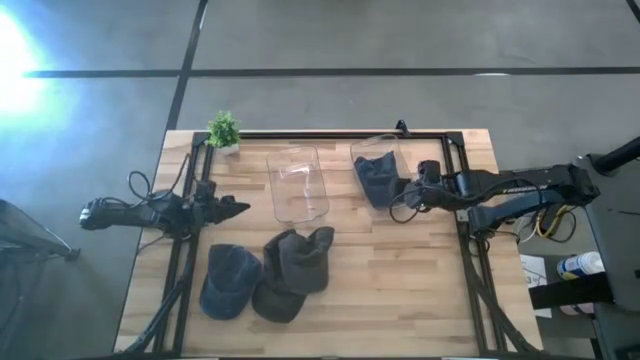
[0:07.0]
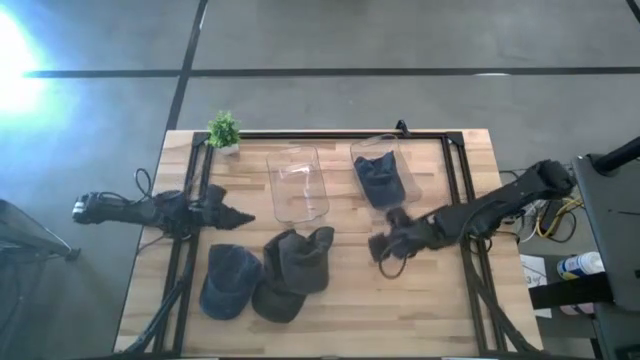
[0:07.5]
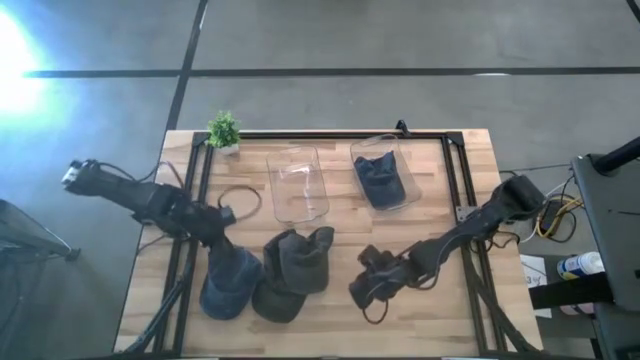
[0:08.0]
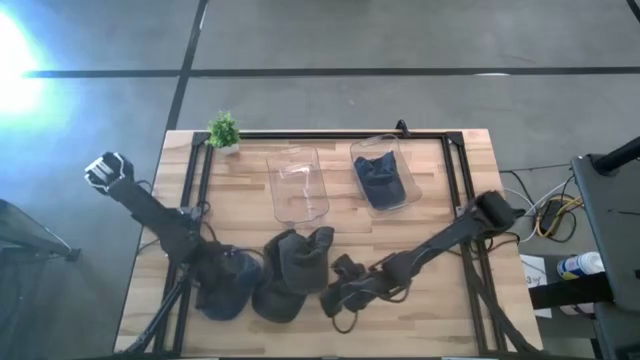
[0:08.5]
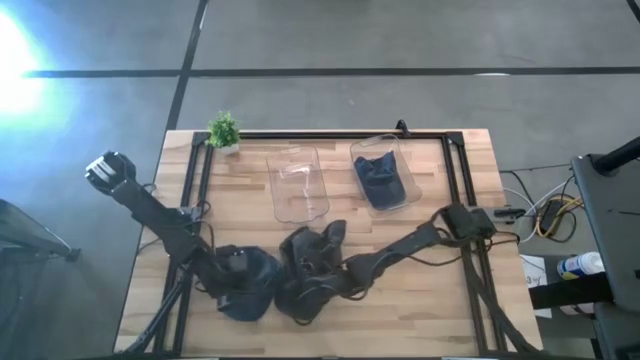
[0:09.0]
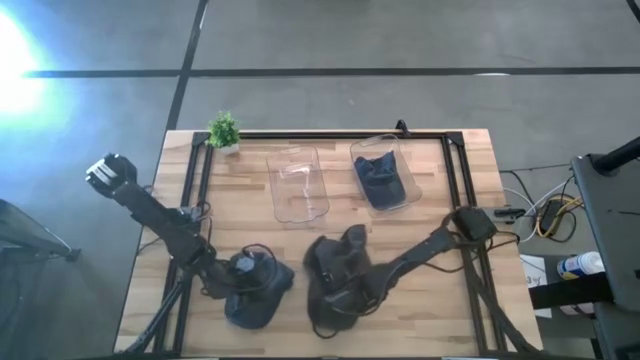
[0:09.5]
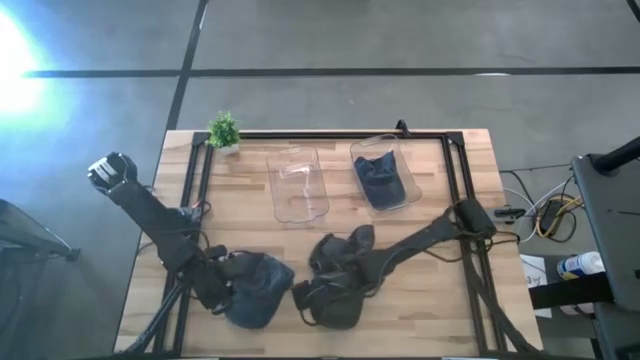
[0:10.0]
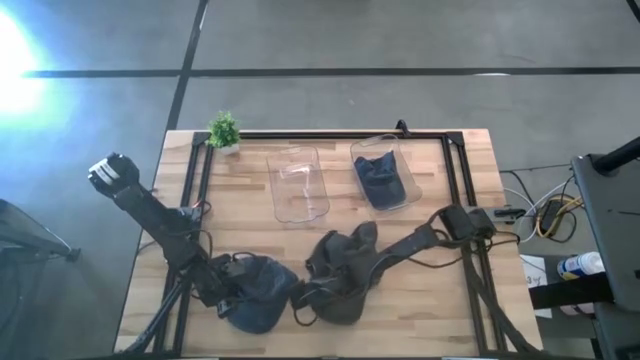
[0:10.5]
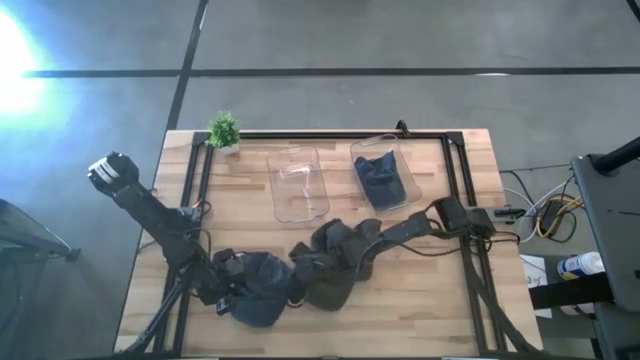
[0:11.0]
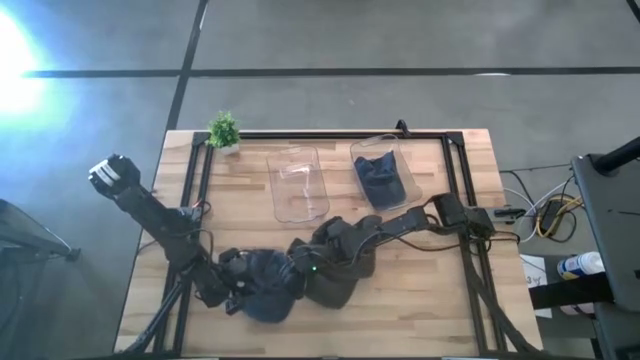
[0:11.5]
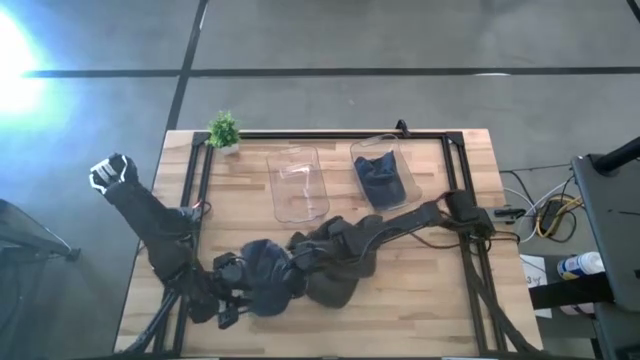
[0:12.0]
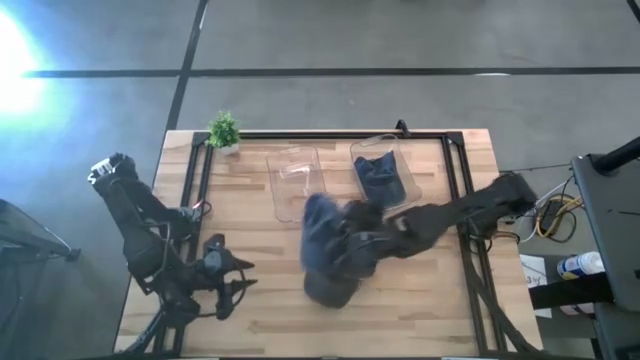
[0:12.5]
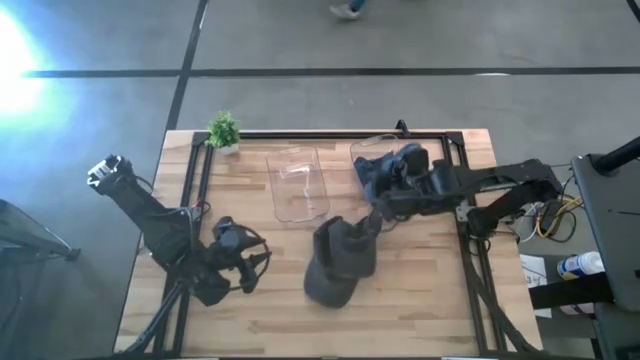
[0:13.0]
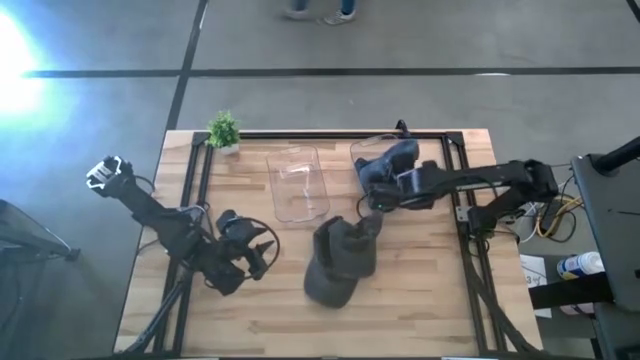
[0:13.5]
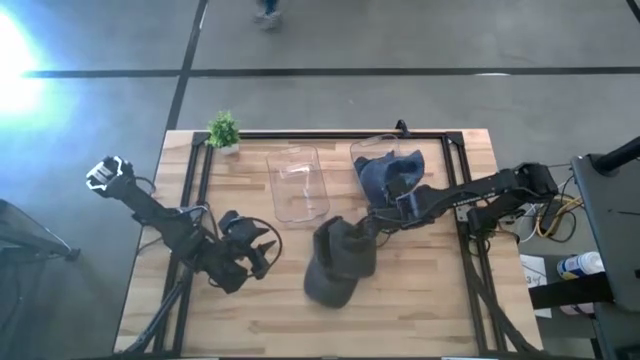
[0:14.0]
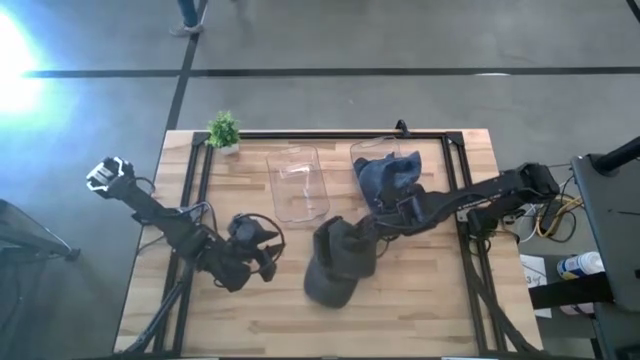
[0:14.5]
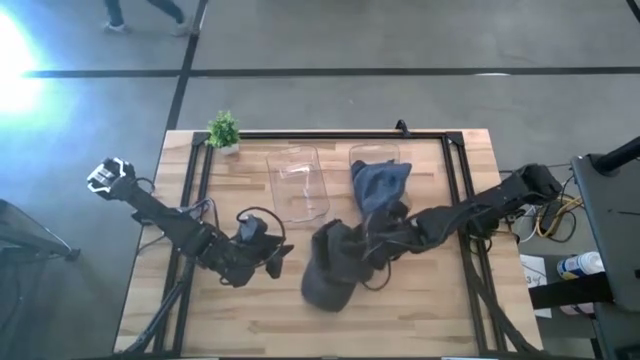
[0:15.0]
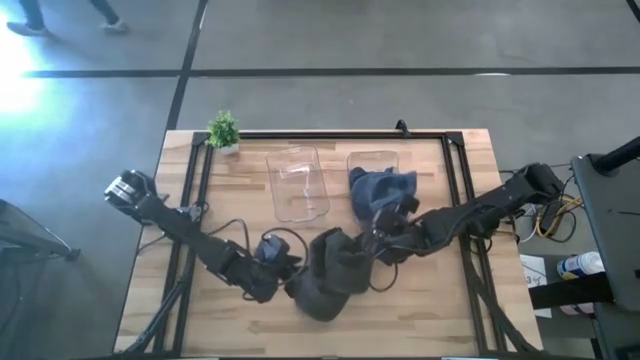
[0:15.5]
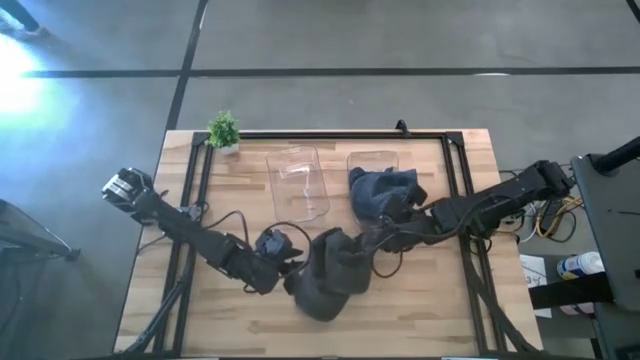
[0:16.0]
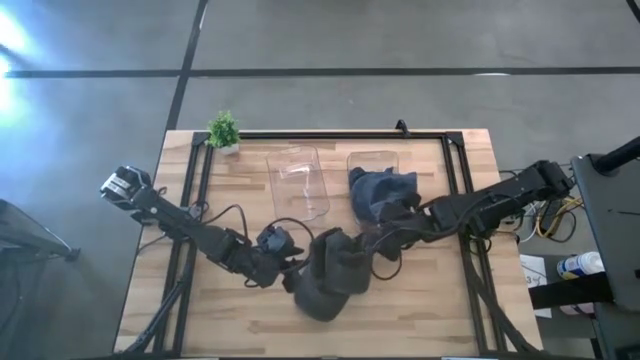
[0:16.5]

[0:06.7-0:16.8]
Task: Pick & Place hat
Put the blue cap into the right transparent bin

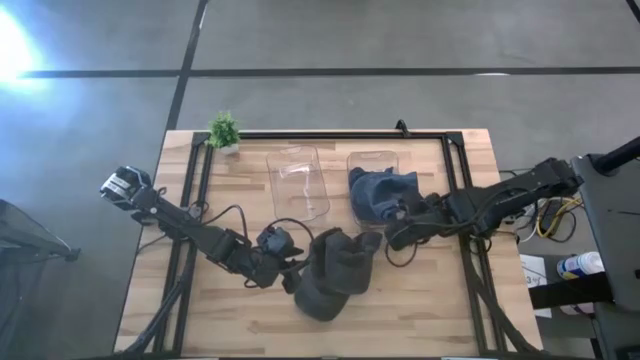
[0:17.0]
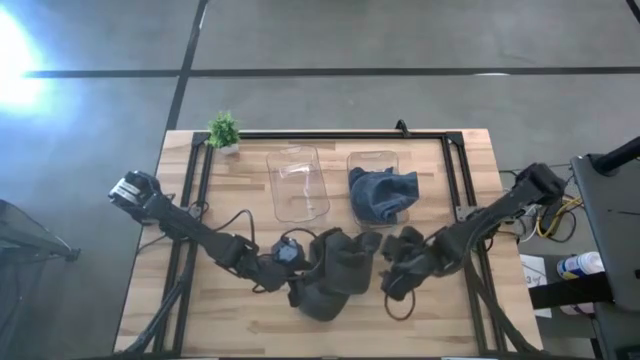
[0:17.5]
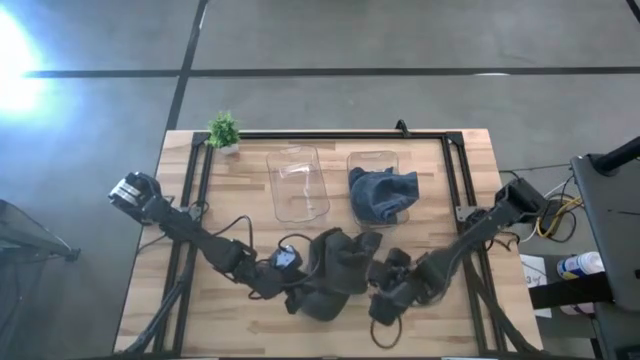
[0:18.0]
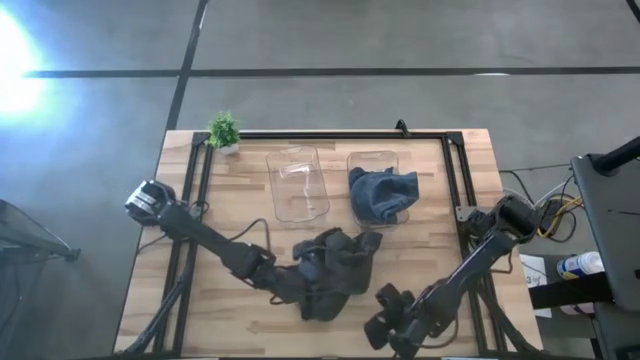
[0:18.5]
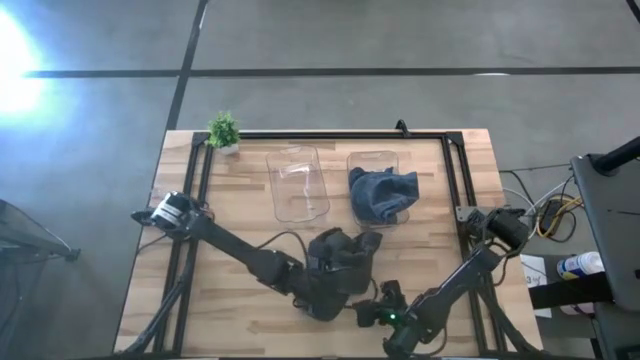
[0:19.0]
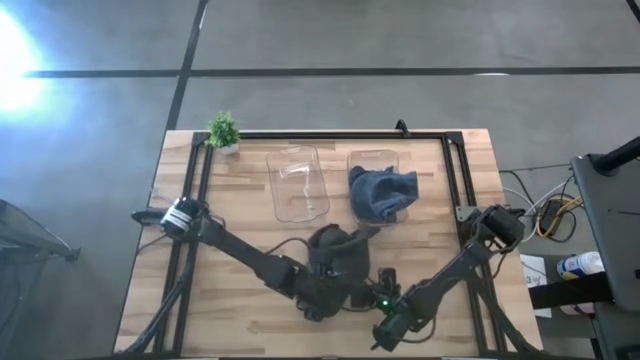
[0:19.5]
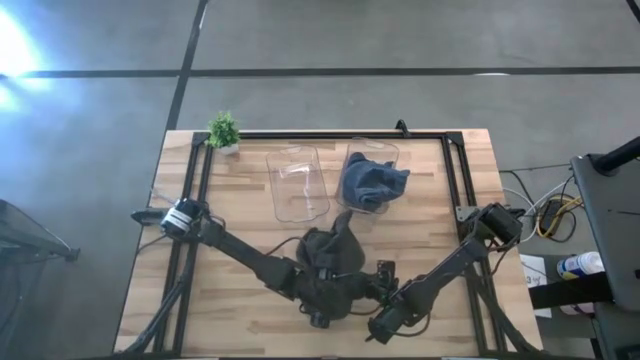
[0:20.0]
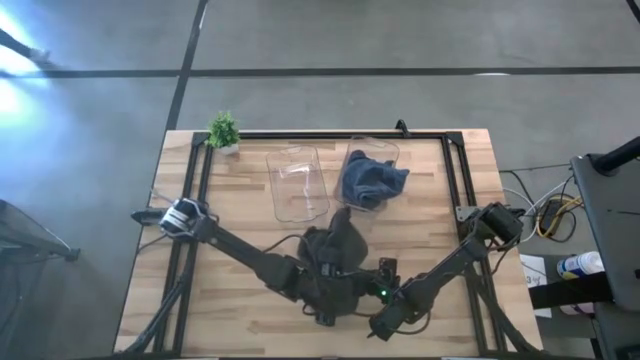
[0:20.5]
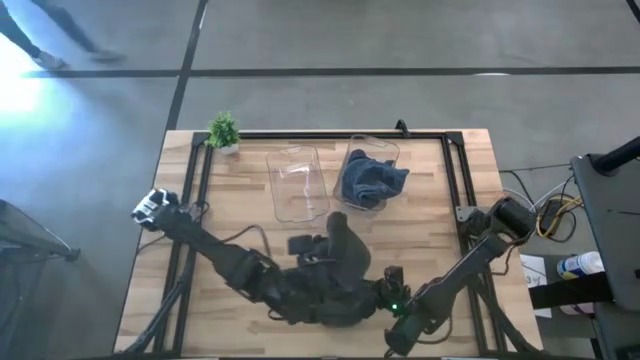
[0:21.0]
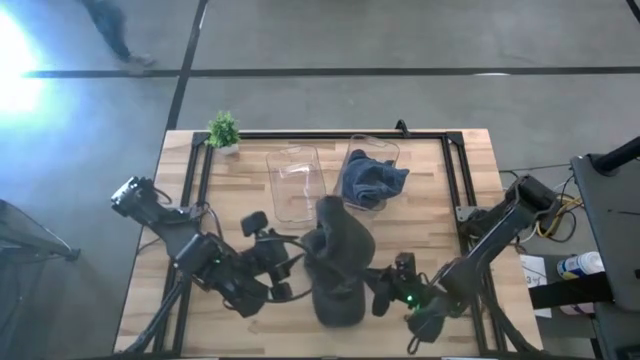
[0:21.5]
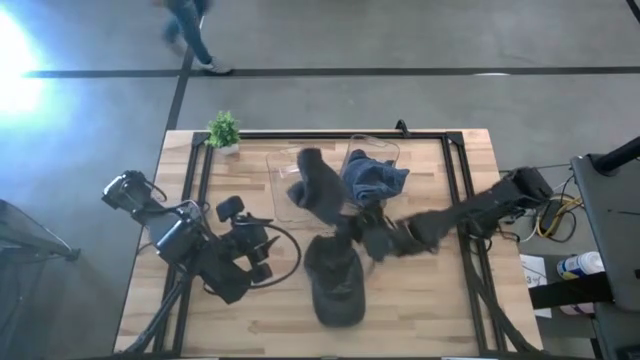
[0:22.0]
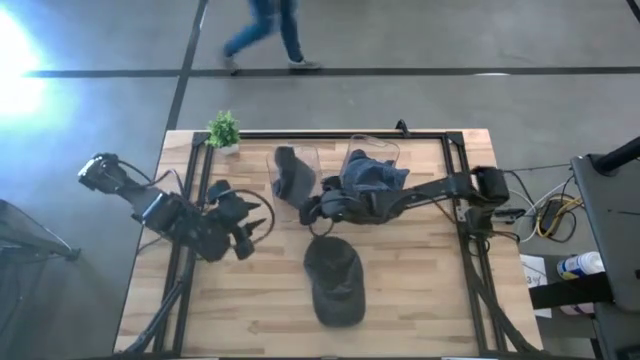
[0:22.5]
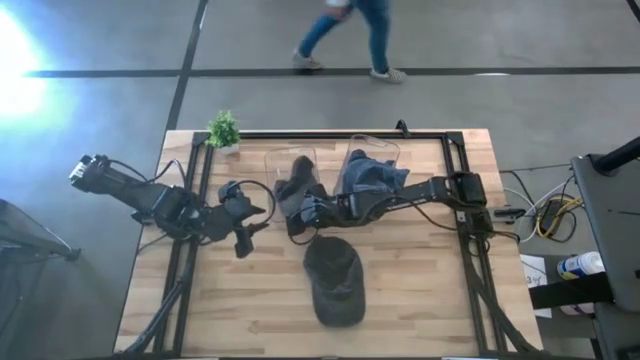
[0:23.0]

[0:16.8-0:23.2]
Put the right black cap into the left transparent bin

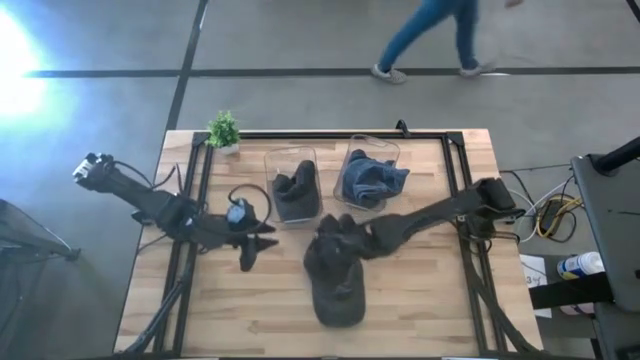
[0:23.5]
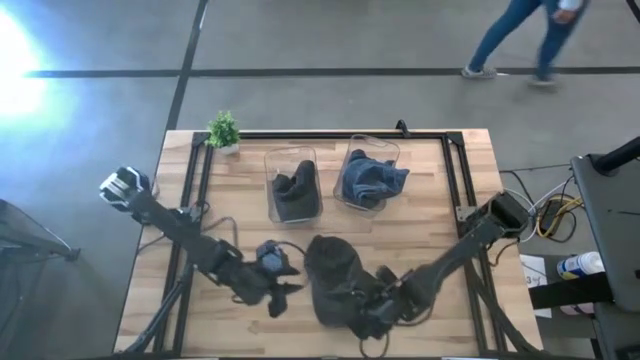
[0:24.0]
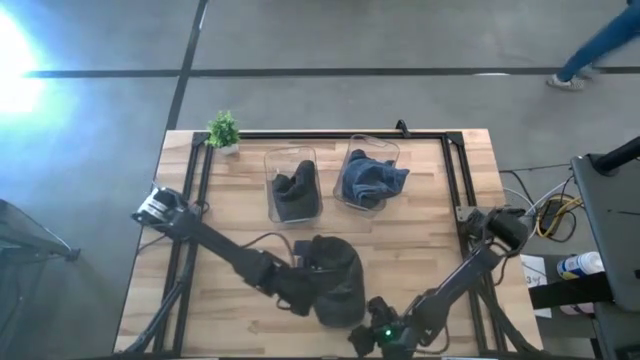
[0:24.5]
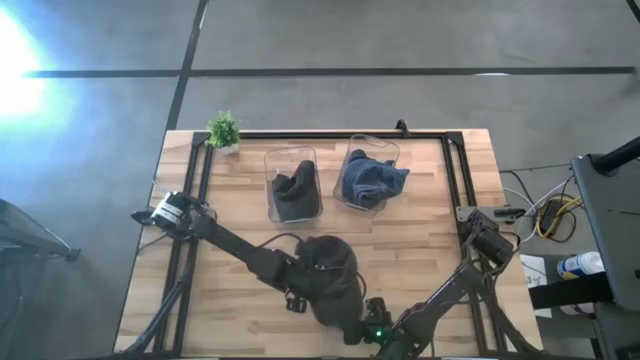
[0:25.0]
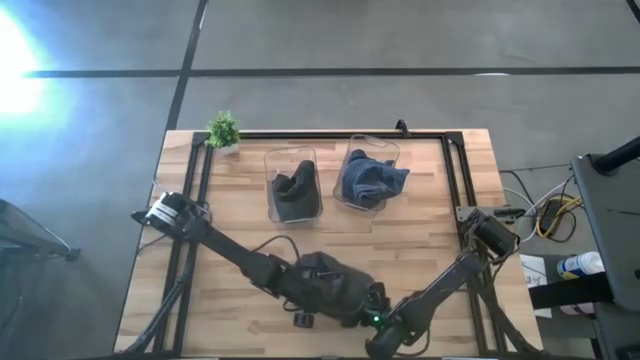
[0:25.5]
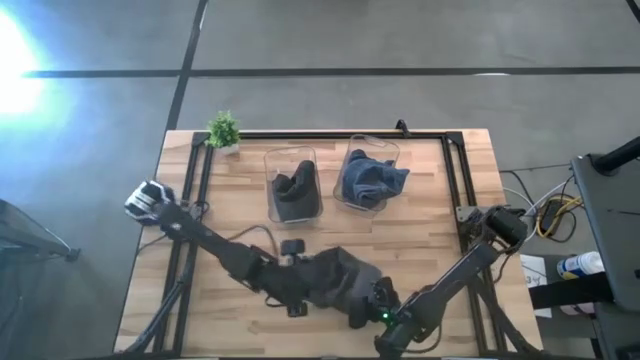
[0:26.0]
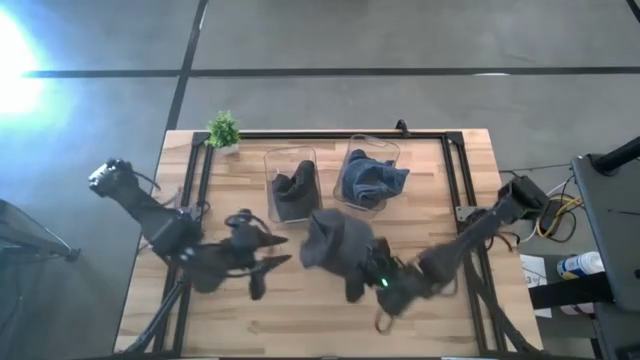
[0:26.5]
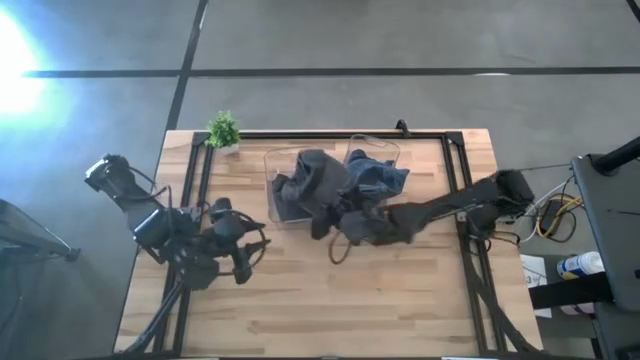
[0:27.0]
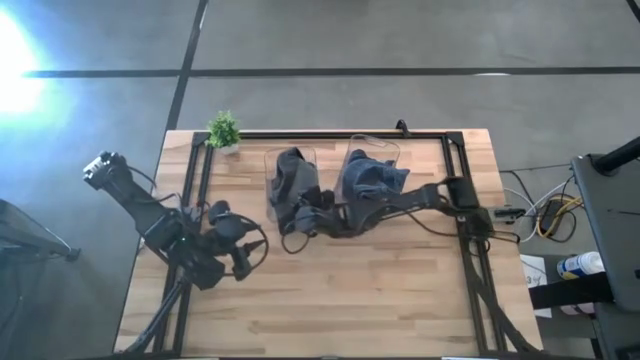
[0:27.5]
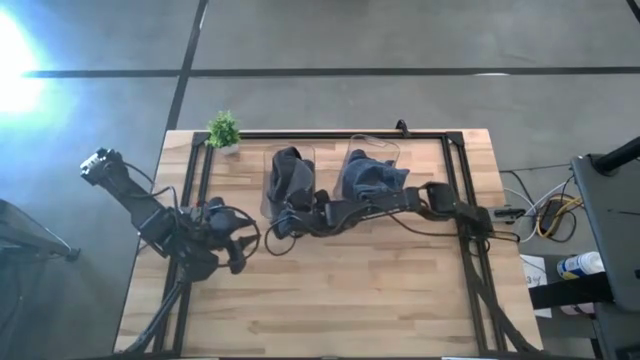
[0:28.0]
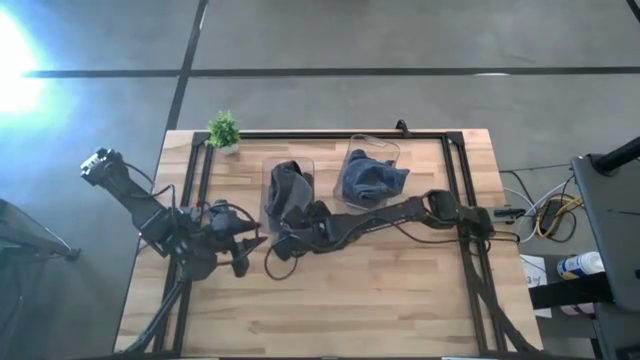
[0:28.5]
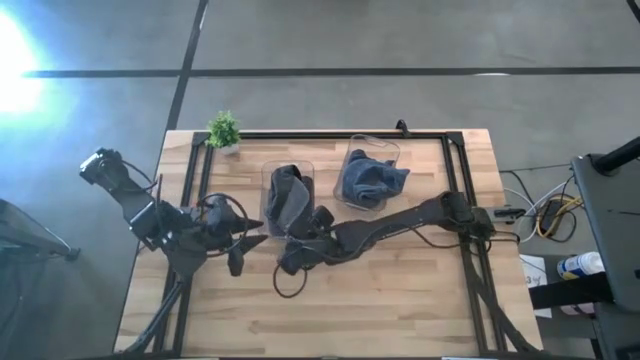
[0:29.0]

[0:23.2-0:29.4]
Put the black cap into the left transparent bin
